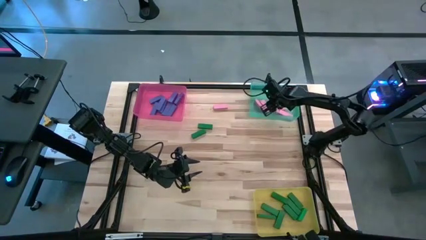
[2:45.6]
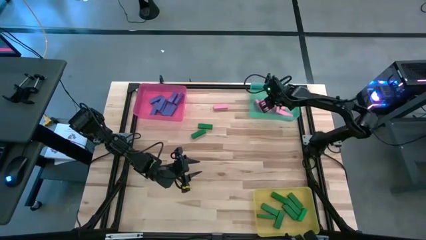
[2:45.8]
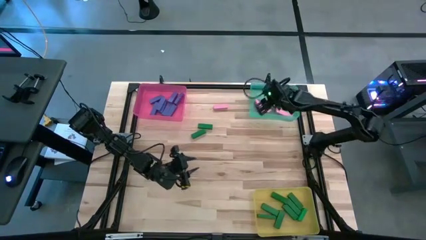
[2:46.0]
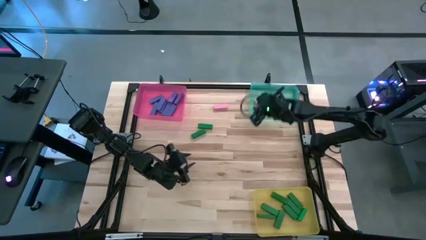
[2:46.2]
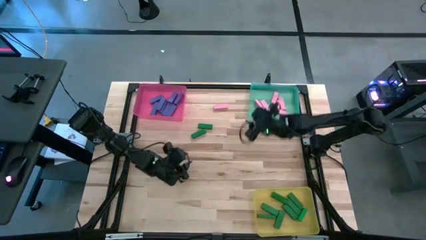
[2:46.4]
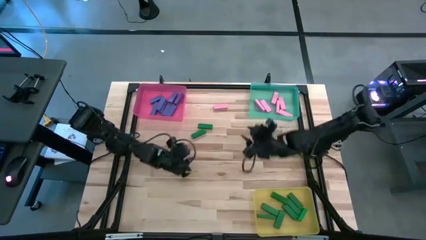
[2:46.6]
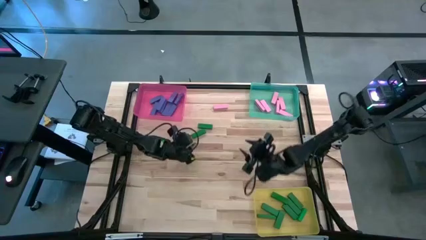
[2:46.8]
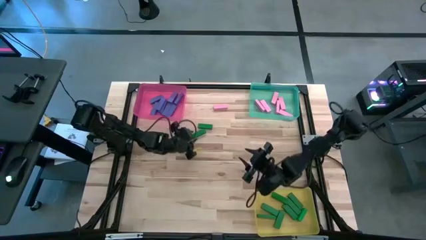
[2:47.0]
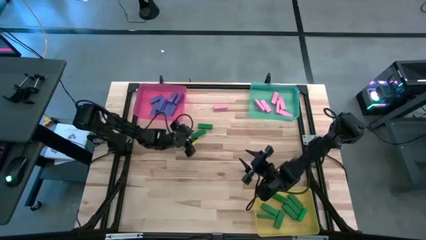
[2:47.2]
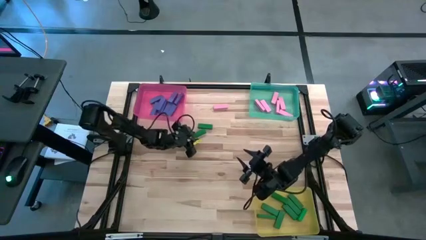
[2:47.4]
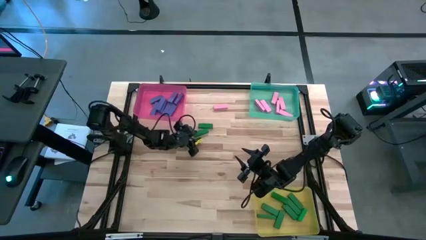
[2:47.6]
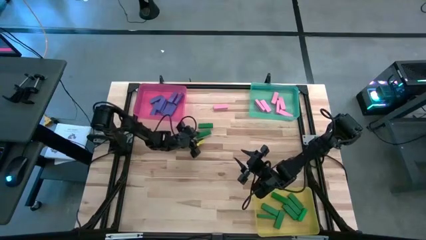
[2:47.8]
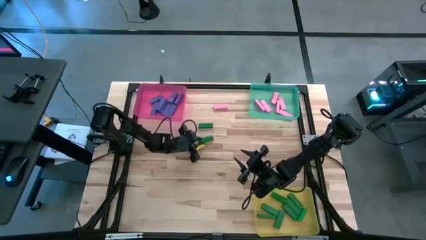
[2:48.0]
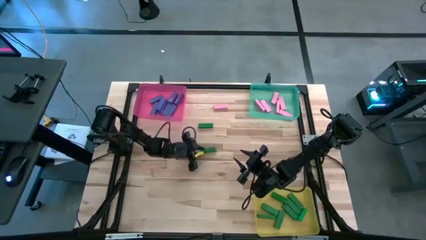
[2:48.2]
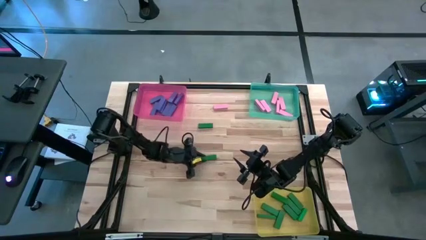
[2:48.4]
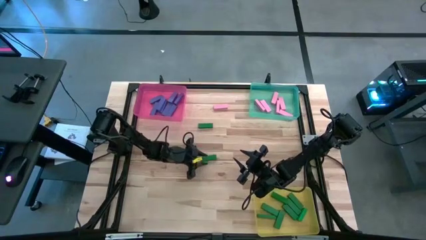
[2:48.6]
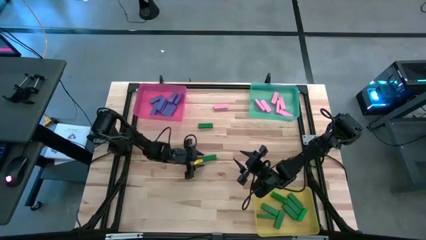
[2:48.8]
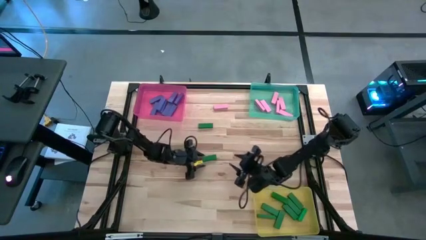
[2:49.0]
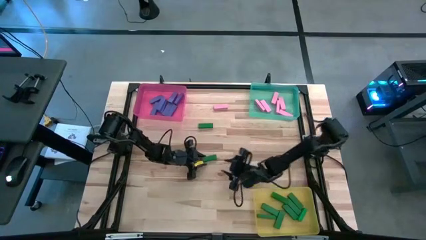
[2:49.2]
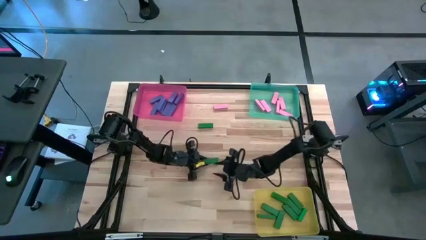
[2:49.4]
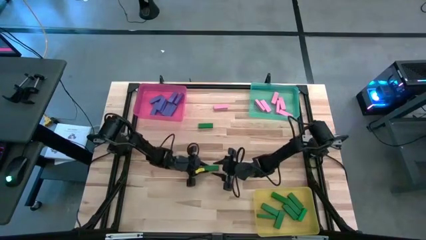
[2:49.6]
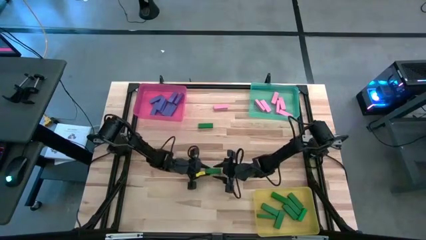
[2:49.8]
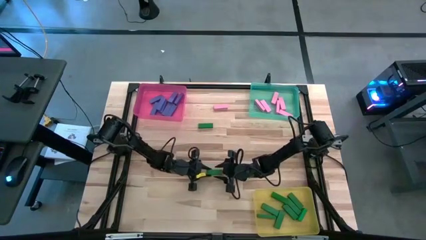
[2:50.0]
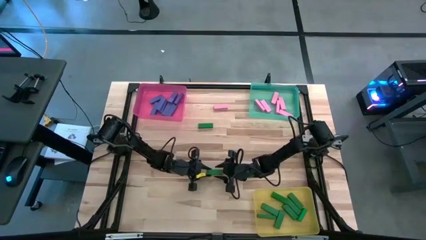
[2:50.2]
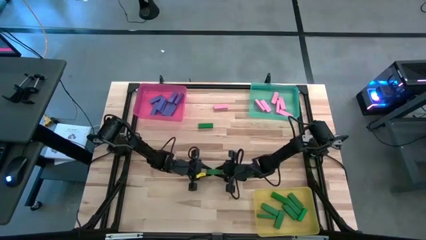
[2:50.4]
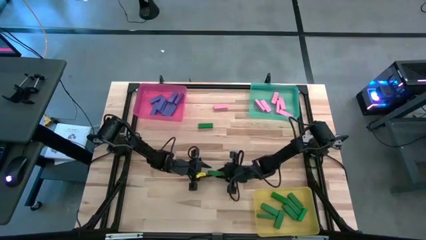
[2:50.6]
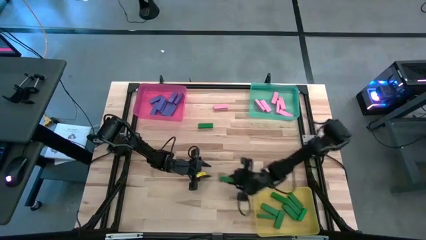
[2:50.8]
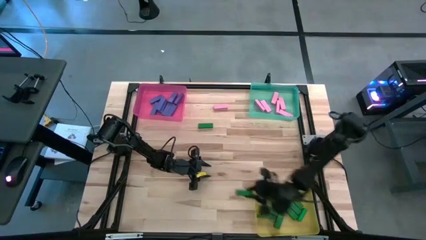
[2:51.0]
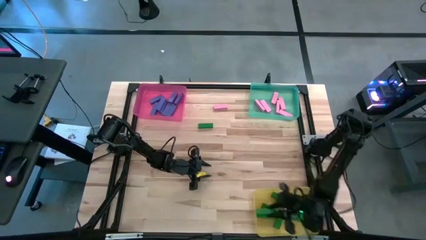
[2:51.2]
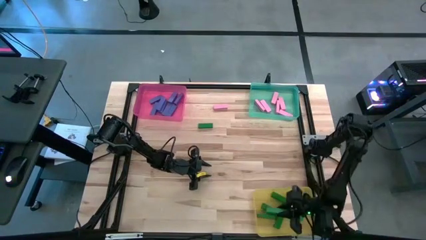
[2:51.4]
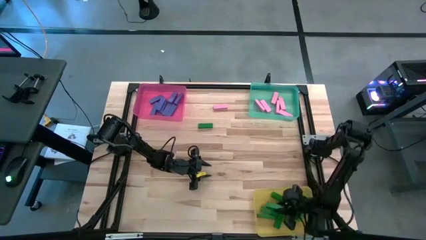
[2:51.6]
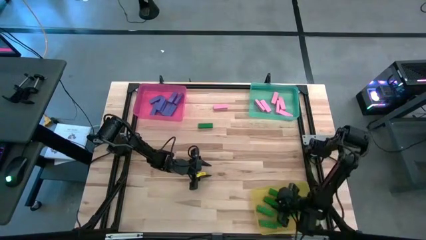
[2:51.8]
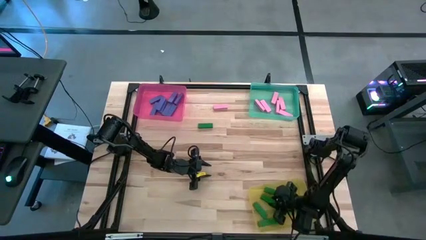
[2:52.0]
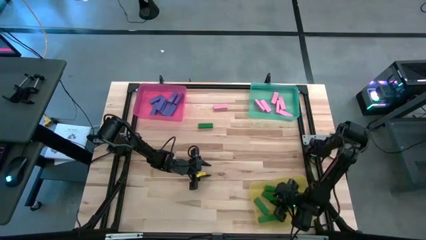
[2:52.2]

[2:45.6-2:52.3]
Task: Sort blocks
Put the green block into the yellow bin

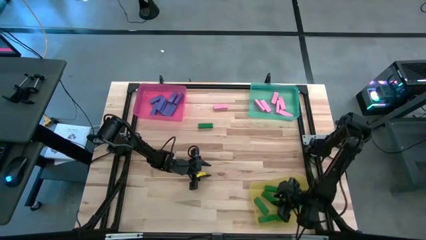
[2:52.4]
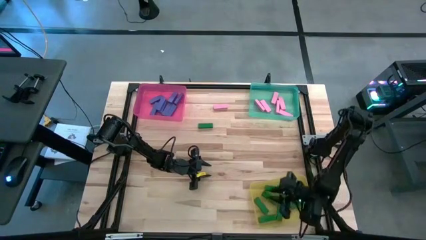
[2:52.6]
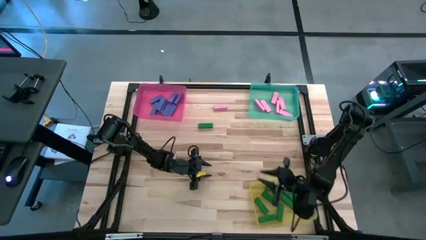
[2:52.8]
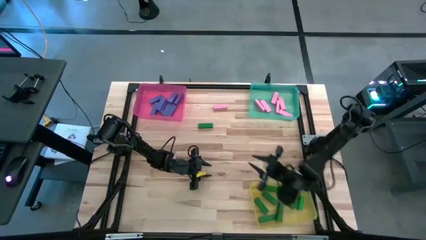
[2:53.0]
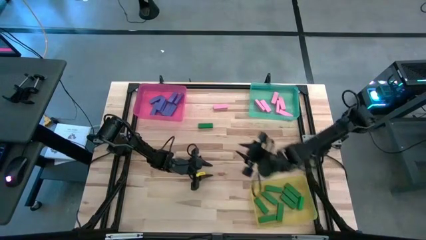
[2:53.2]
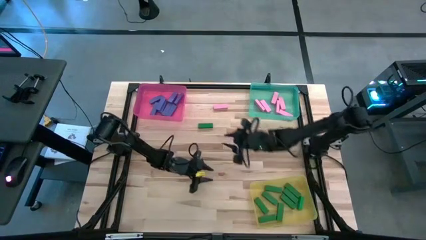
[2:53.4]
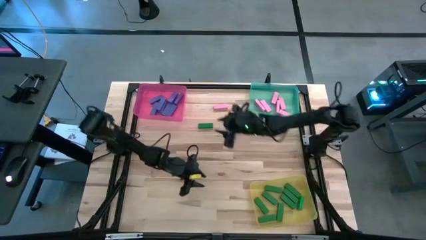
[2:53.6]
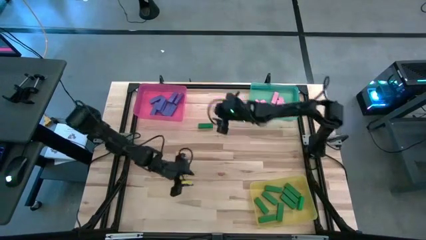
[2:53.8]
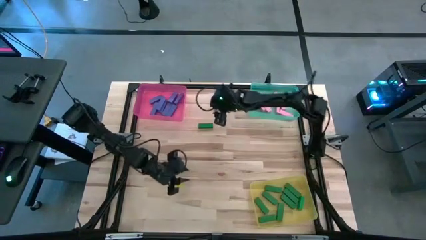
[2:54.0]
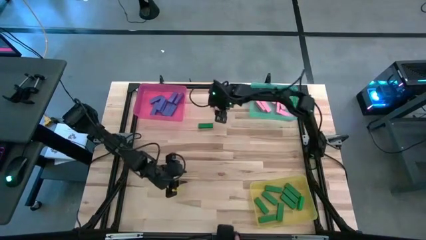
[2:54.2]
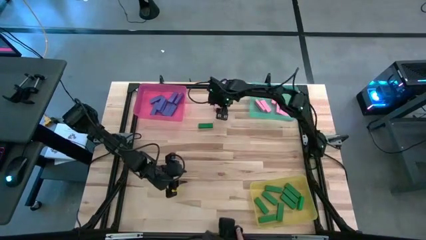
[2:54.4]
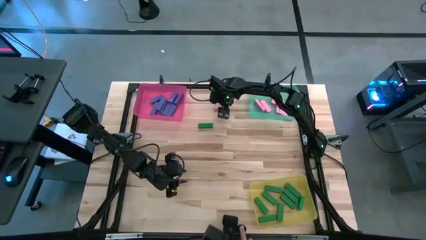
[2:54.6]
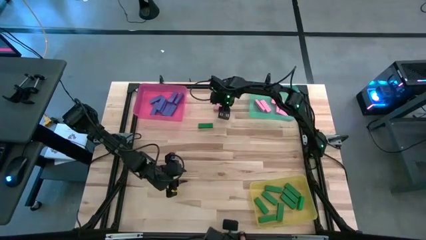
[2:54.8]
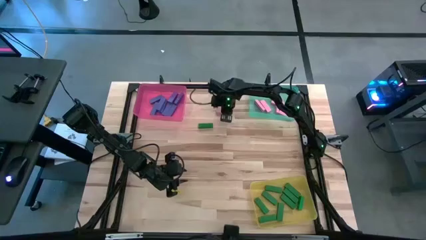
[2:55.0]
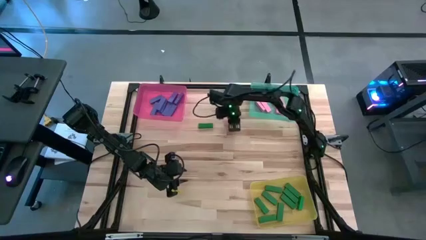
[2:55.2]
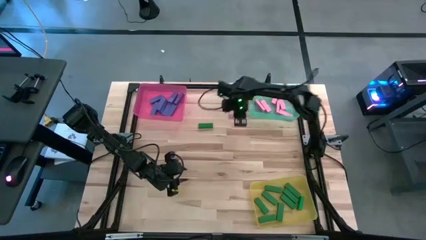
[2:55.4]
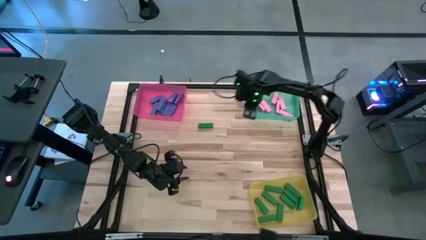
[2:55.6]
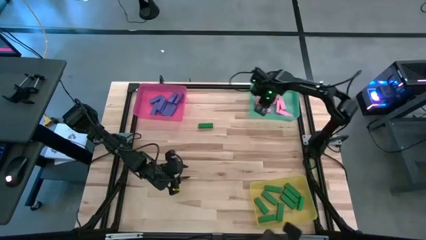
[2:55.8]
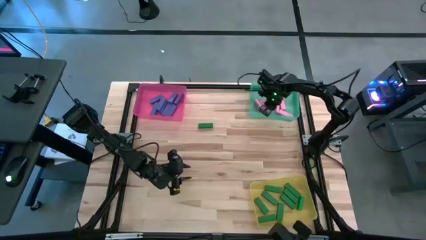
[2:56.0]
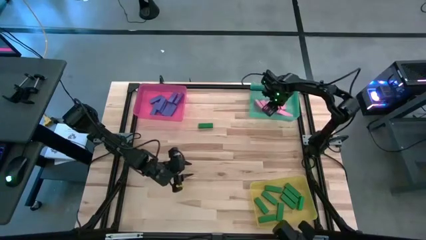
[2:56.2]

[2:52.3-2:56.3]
Put the pink block into the blue bin

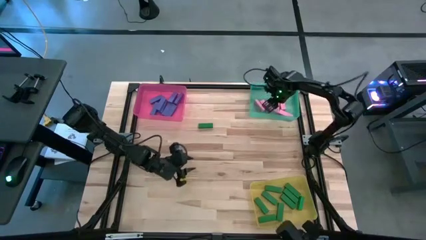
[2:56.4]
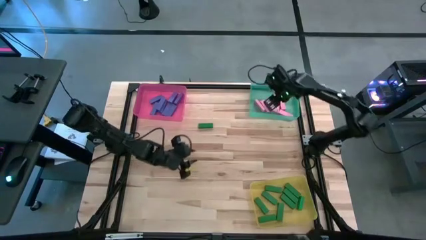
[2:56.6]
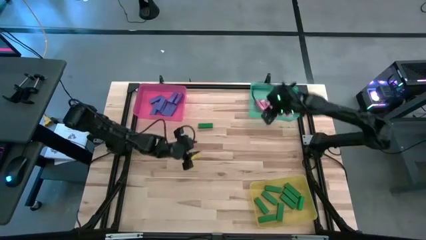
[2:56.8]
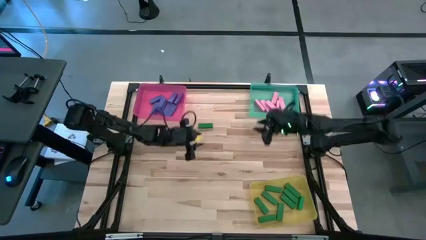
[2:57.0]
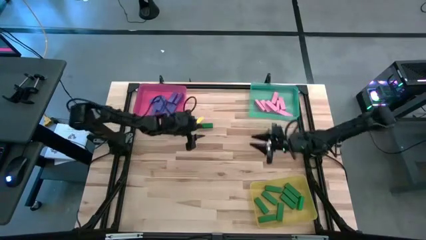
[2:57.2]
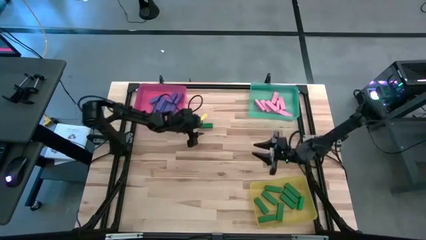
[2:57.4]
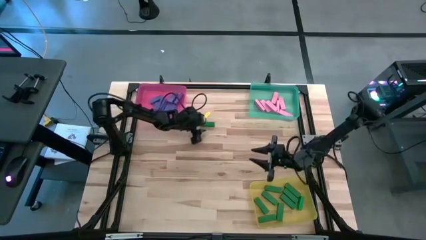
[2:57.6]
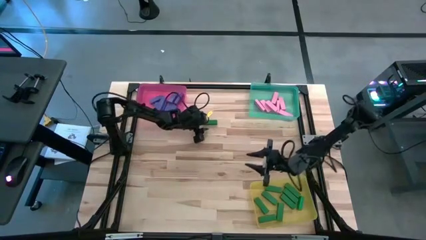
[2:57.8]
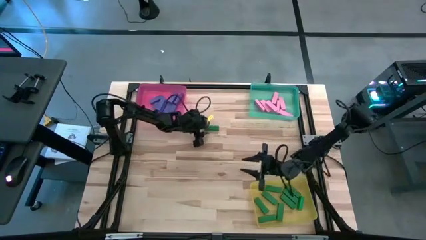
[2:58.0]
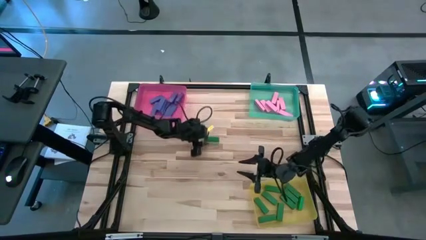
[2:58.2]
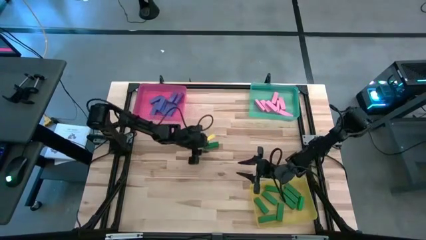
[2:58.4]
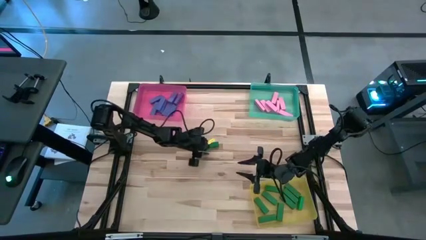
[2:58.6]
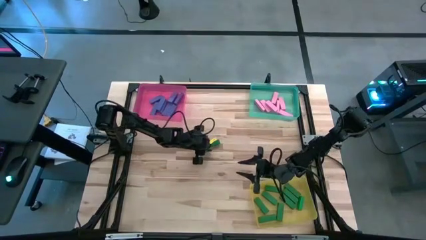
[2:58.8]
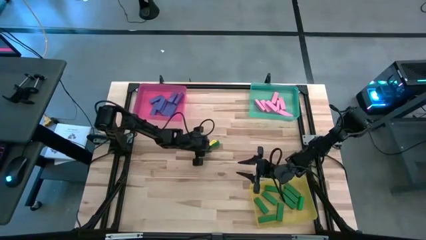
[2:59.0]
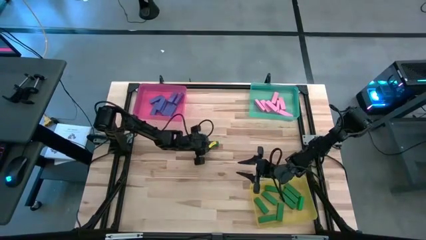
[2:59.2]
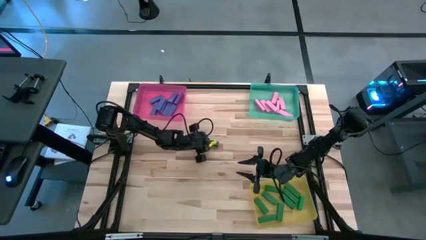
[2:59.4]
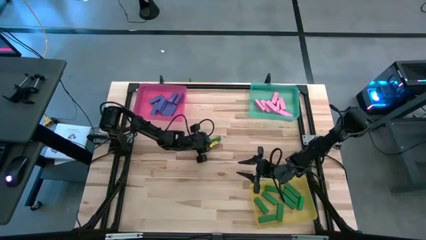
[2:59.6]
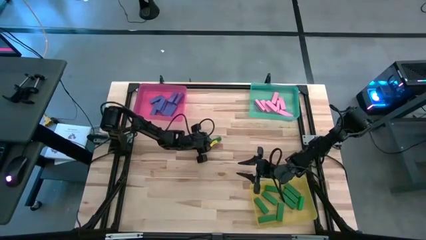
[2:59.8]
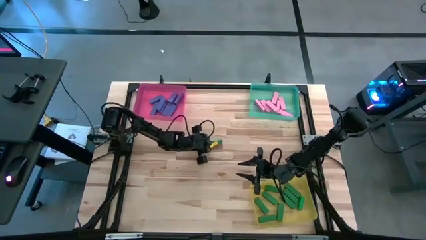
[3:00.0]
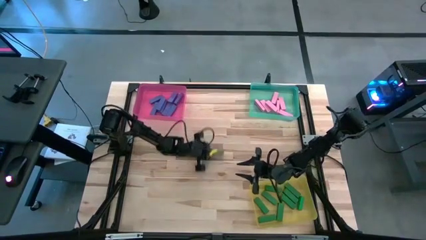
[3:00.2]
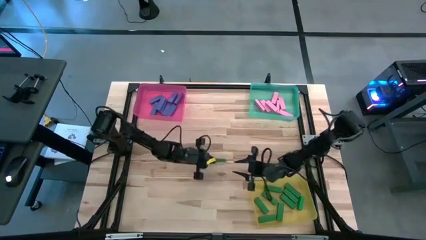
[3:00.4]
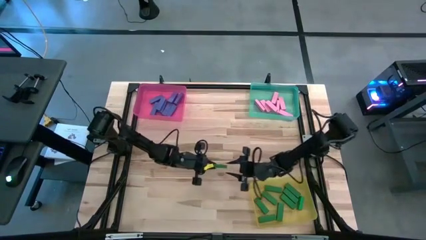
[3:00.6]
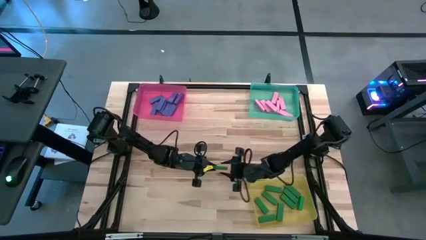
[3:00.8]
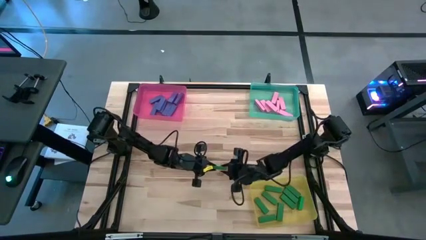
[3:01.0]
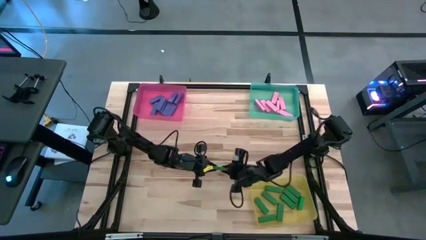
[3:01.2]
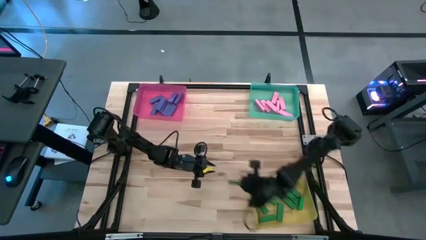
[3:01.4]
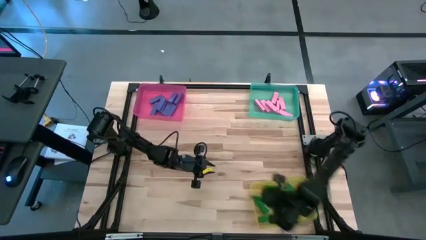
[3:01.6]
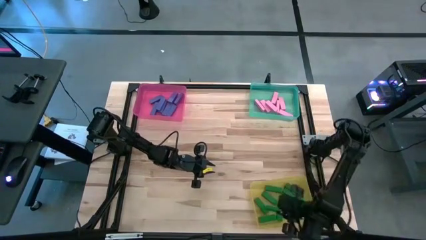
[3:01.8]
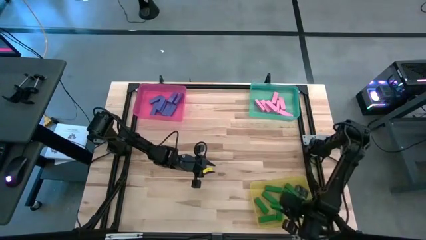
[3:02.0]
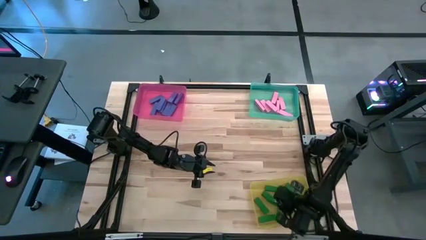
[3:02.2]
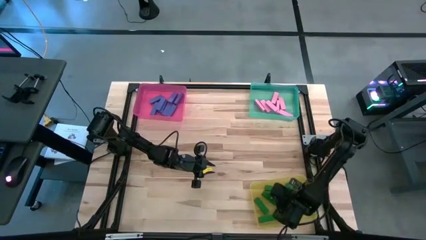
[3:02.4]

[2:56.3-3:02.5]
Put the green block into the yellow bin
